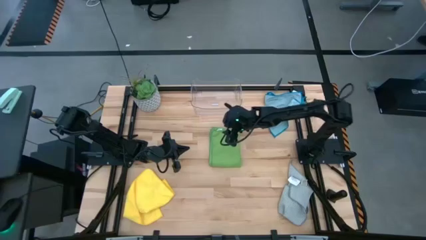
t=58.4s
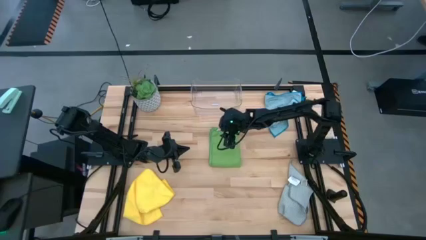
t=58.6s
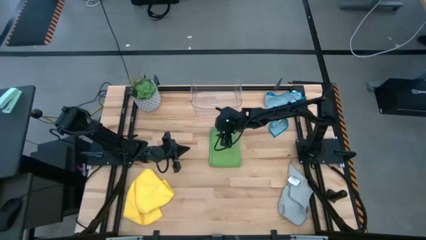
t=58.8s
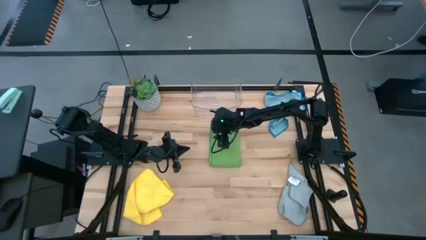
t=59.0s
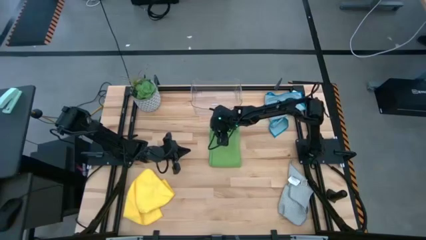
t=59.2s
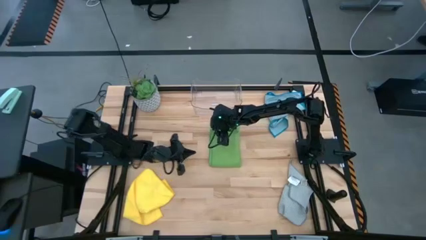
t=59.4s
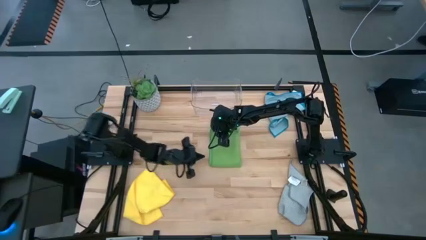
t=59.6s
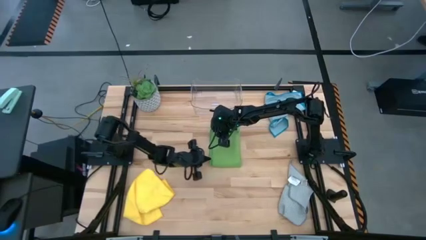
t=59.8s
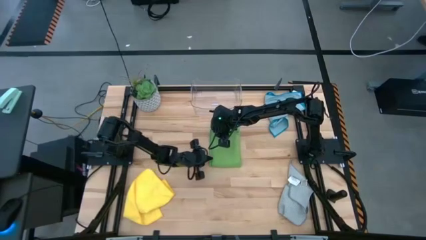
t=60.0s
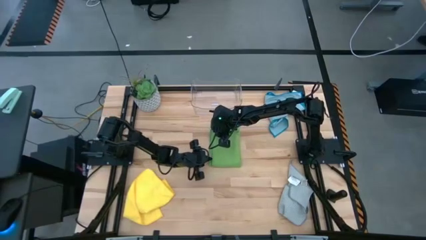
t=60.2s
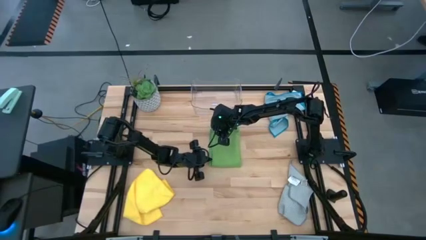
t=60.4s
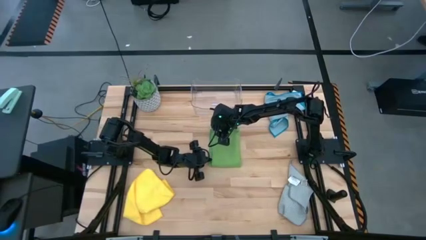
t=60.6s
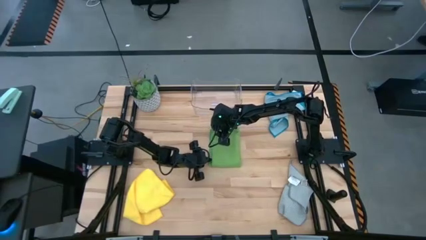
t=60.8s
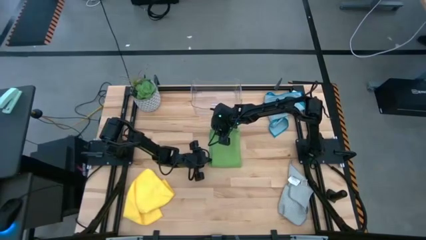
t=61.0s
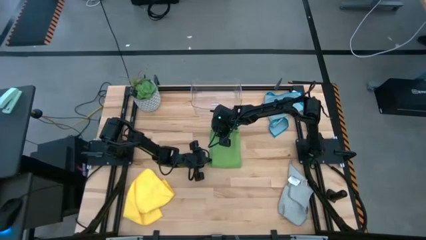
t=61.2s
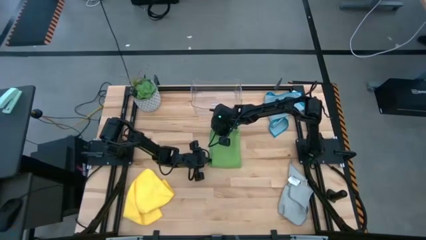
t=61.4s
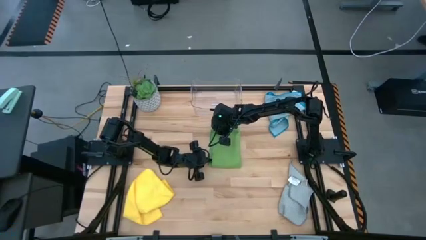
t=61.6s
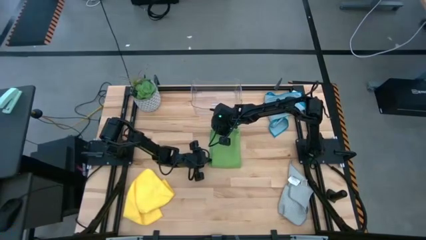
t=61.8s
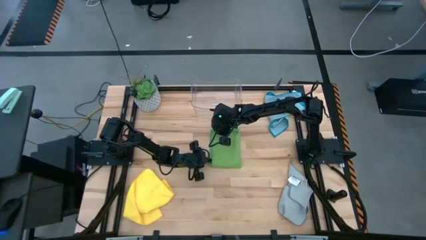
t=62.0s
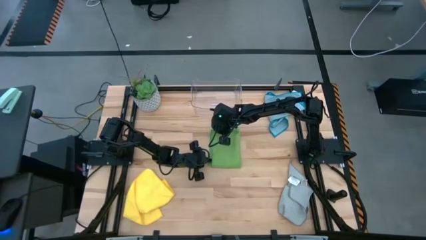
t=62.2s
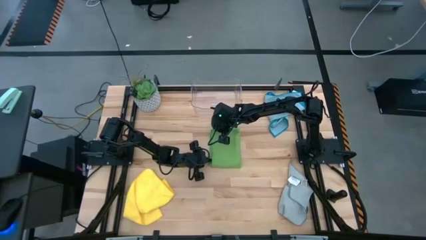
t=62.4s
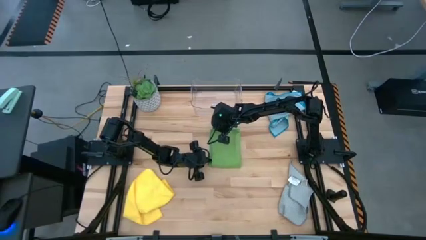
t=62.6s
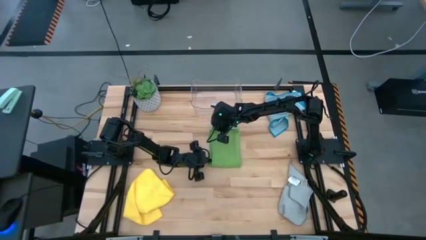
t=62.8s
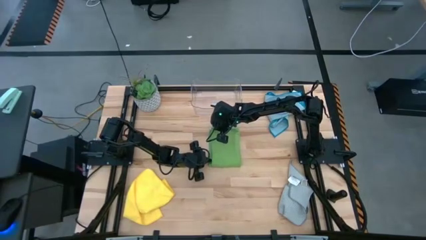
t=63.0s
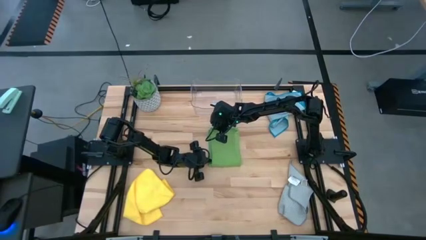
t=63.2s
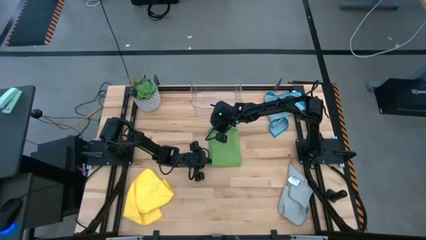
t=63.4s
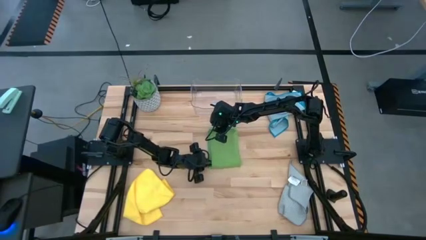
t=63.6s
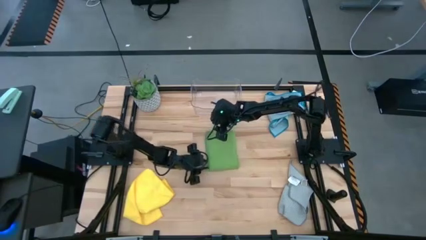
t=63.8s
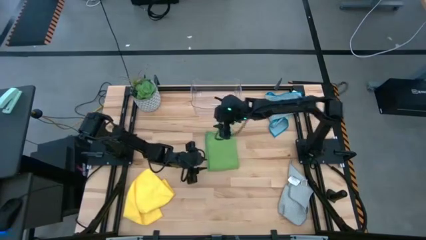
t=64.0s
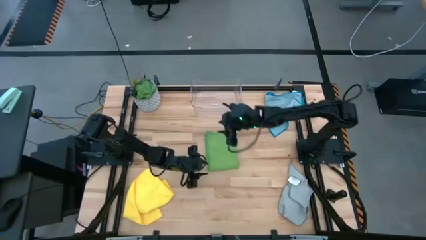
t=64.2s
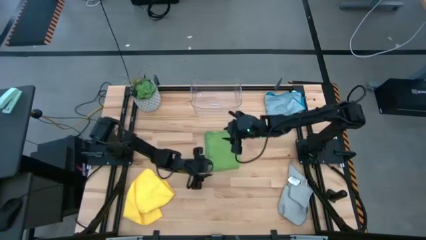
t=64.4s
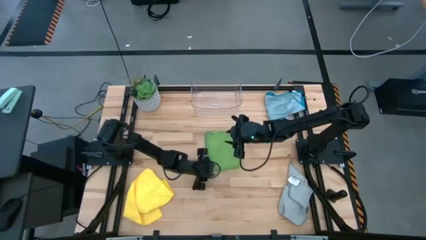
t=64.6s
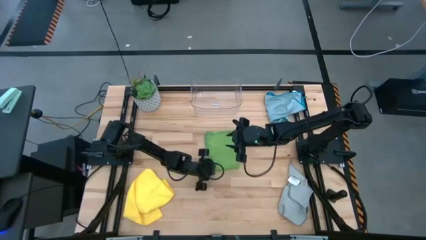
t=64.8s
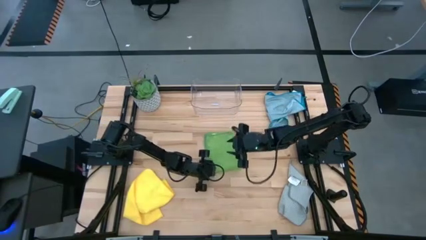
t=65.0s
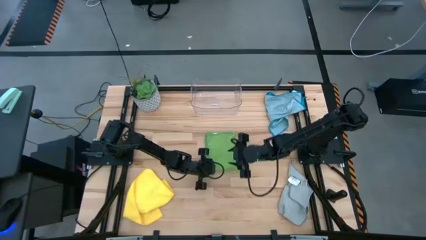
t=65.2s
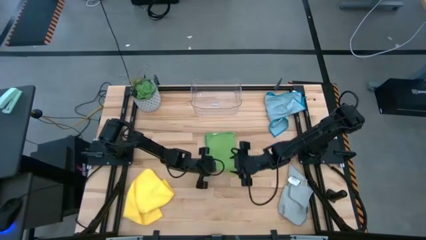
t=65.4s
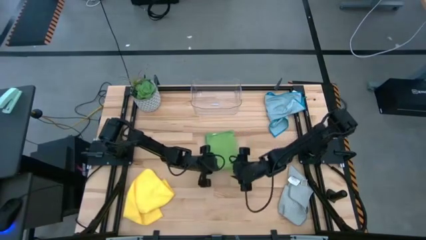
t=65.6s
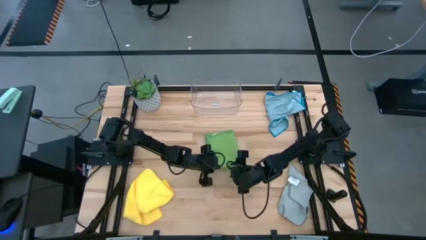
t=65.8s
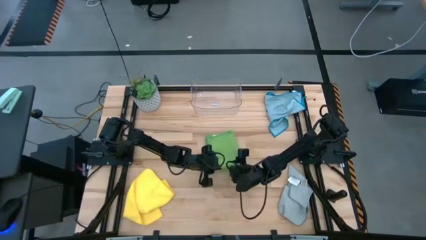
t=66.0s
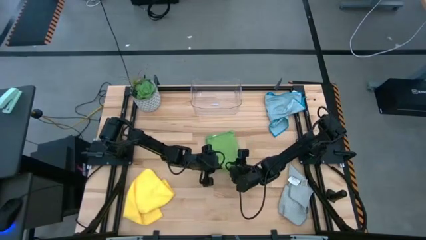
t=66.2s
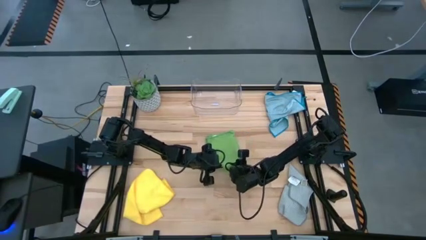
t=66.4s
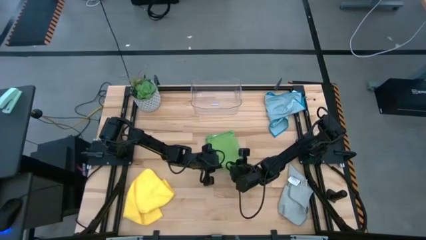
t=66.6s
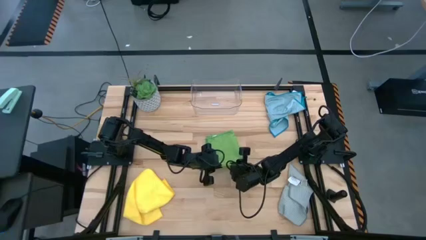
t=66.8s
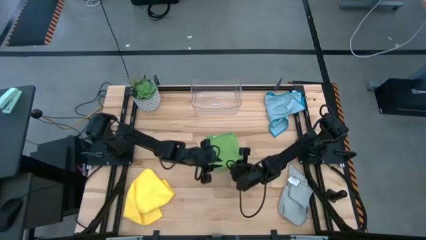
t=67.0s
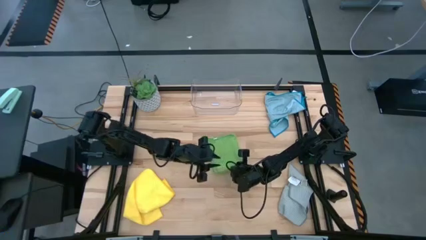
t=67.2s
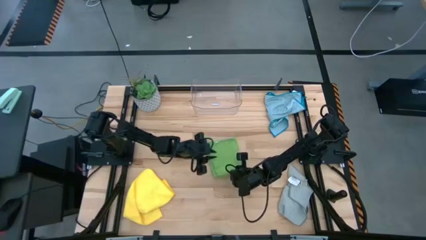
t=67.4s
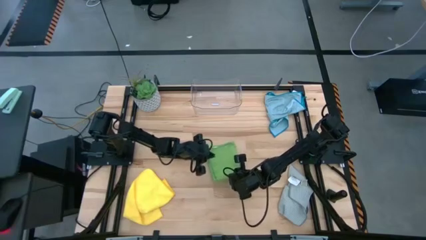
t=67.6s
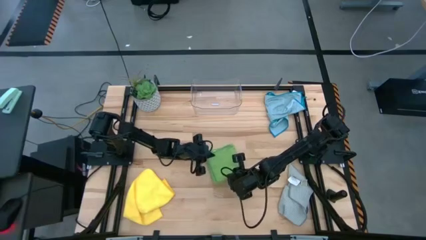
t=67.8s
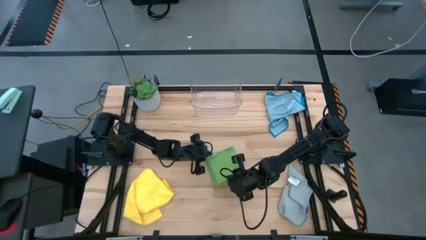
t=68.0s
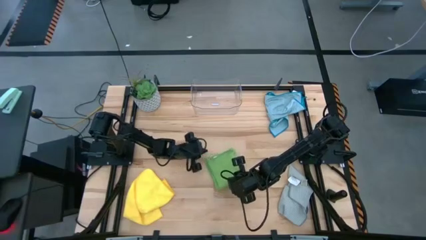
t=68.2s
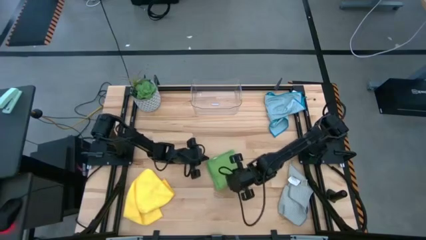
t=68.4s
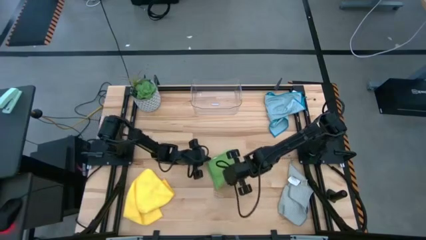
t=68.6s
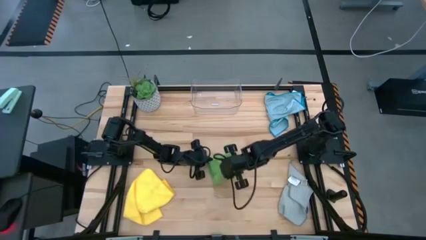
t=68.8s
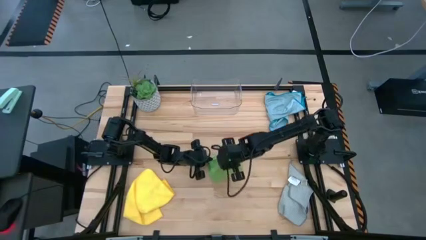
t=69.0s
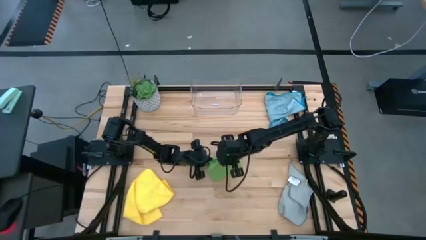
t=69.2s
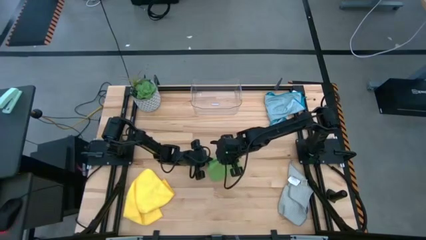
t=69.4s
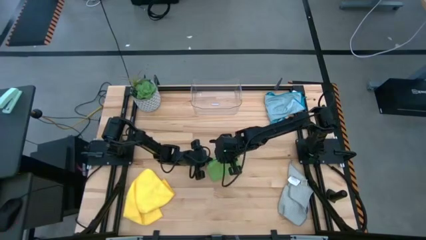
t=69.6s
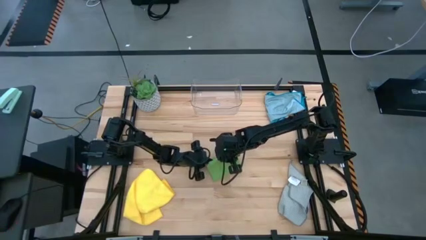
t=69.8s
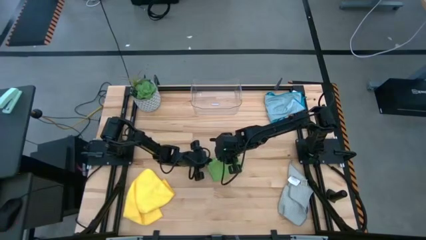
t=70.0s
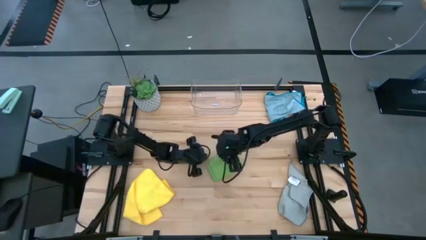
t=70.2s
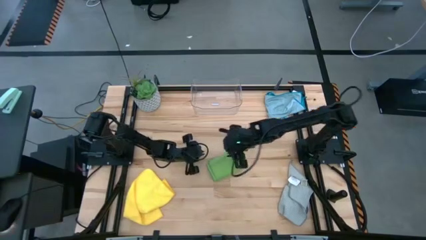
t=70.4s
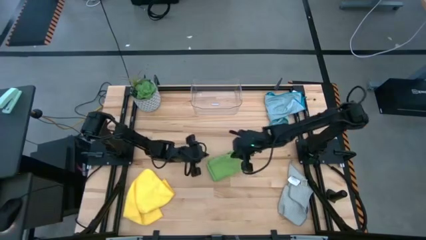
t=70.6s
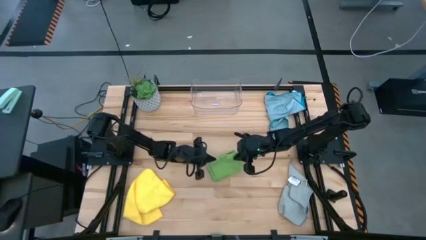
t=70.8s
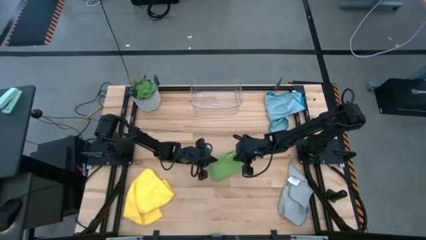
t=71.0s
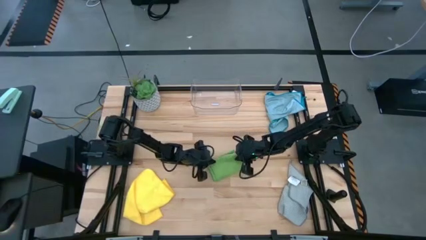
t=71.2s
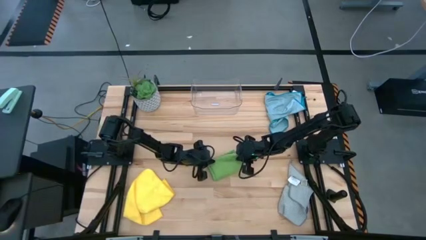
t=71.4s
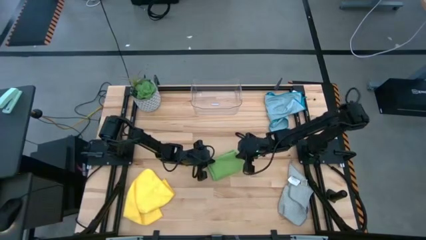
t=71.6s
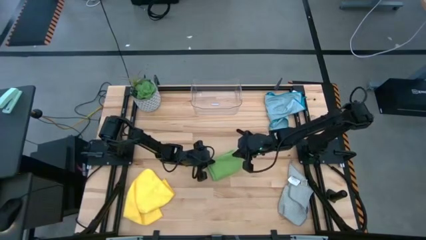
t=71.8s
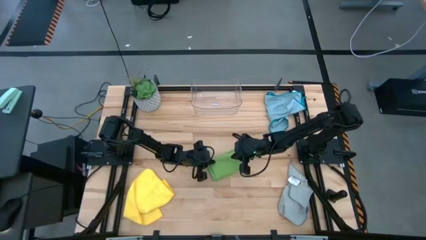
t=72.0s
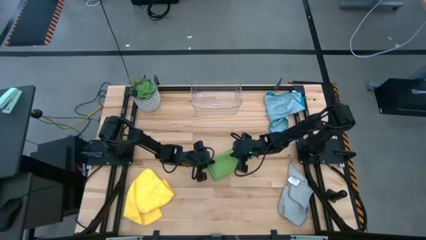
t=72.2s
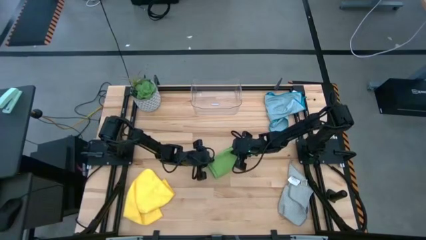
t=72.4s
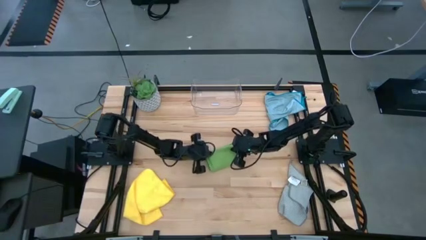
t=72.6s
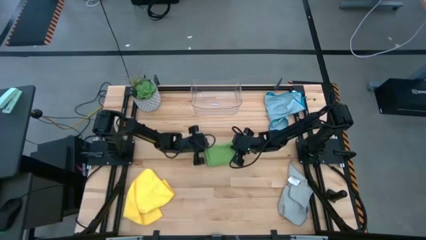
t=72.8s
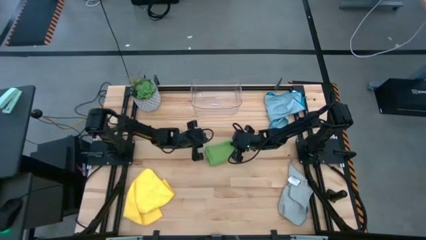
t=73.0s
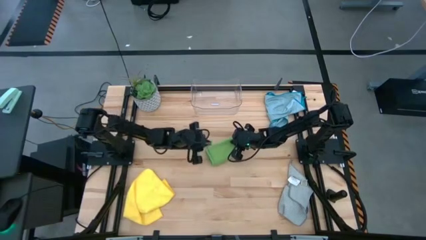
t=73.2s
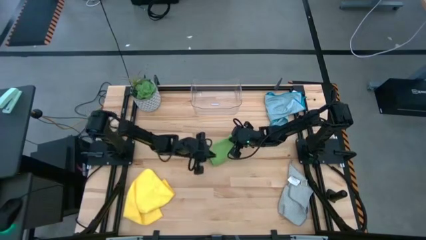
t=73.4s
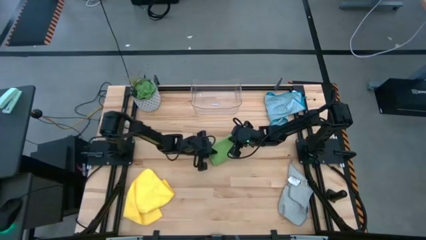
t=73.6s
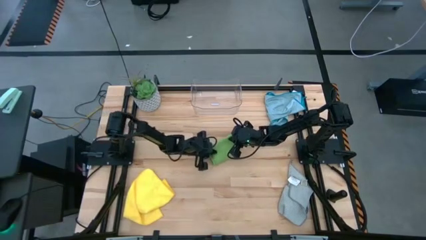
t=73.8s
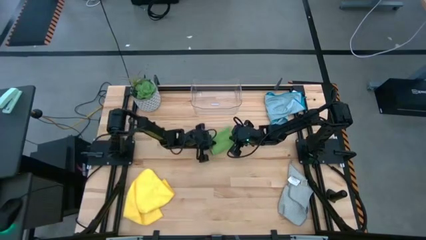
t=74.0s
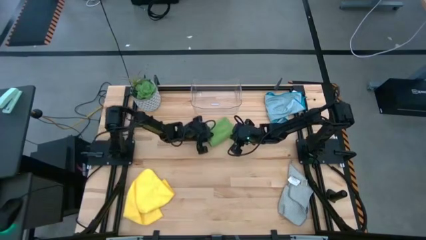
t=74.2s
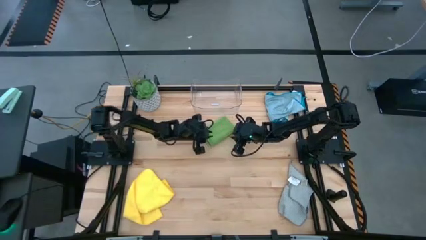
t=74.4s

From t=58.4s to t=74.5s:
Task: Fold microfiber towels
Fold the green microfiber cloth
